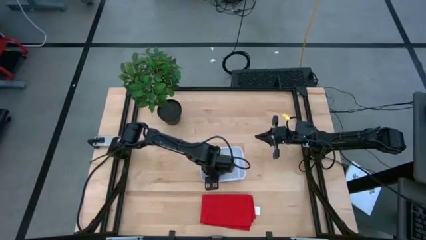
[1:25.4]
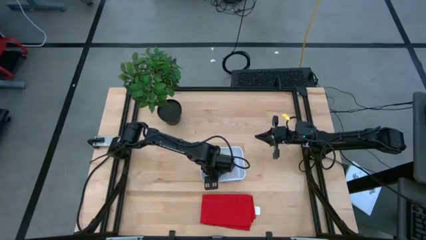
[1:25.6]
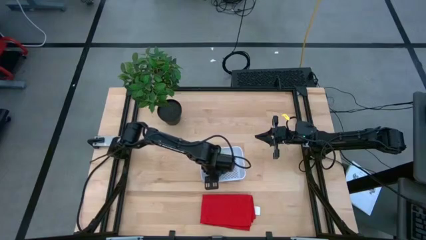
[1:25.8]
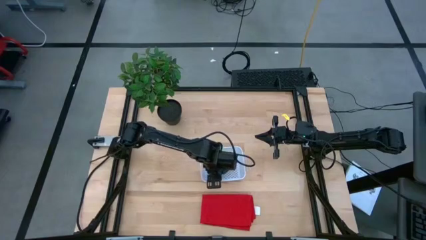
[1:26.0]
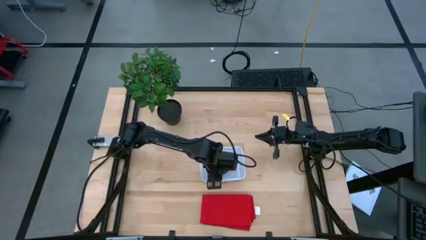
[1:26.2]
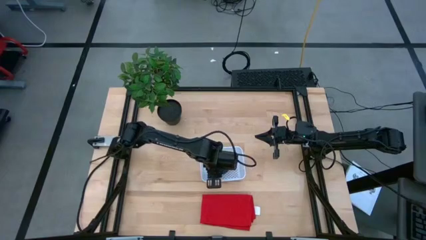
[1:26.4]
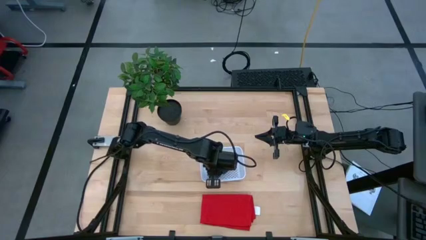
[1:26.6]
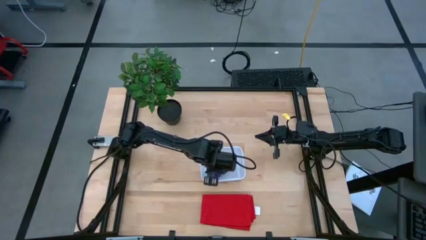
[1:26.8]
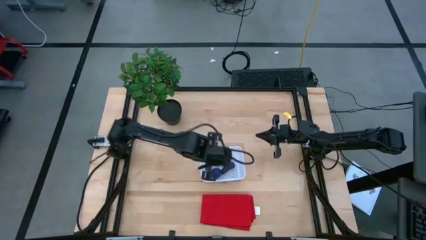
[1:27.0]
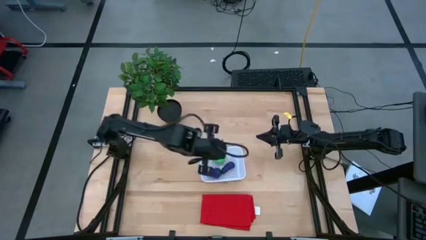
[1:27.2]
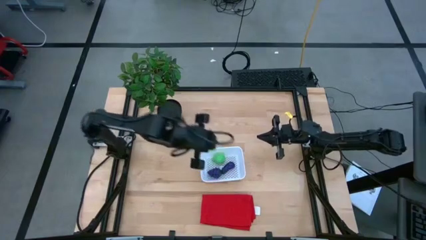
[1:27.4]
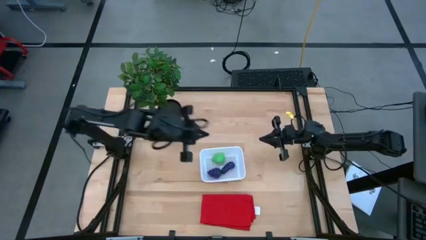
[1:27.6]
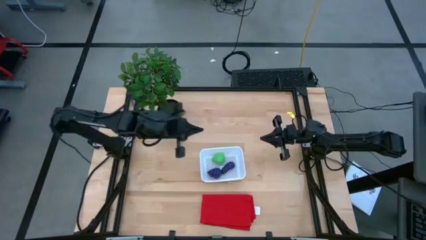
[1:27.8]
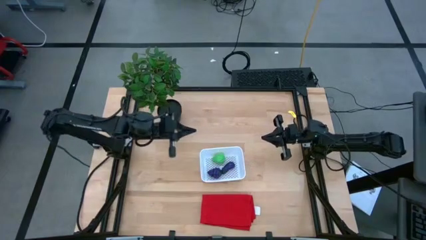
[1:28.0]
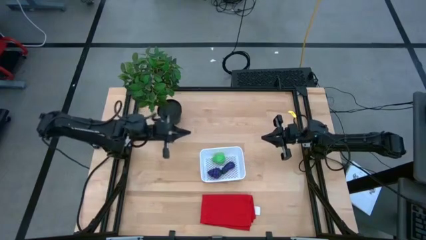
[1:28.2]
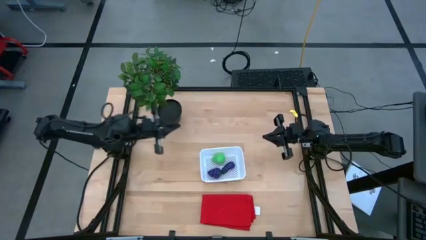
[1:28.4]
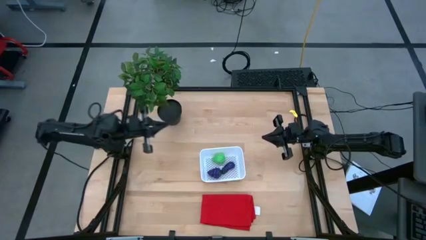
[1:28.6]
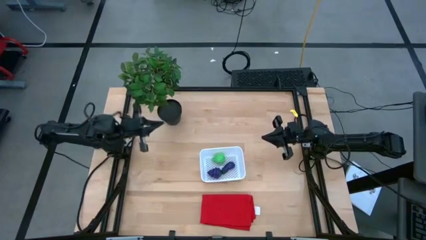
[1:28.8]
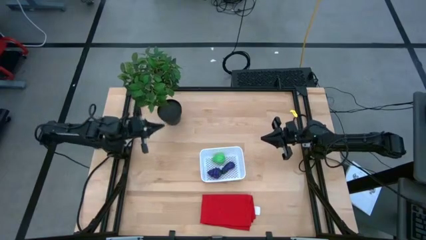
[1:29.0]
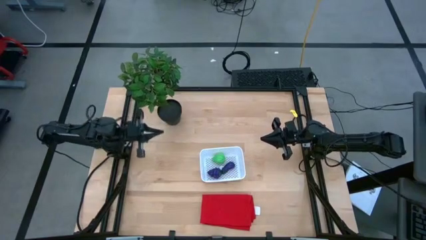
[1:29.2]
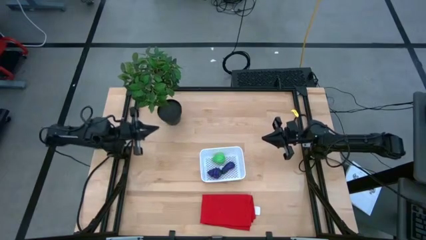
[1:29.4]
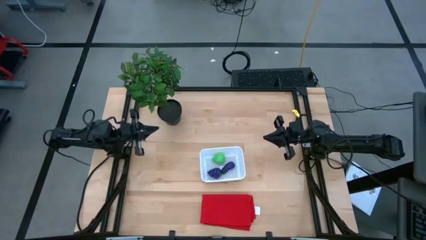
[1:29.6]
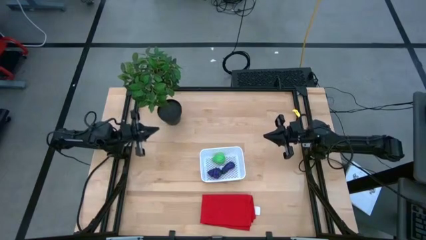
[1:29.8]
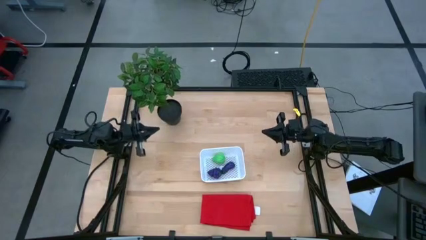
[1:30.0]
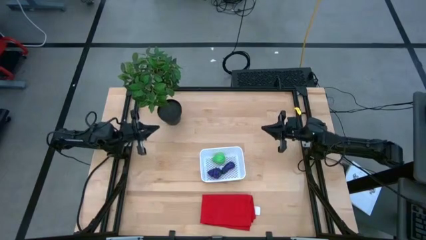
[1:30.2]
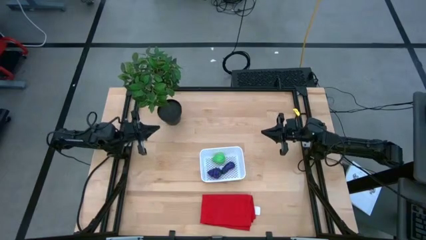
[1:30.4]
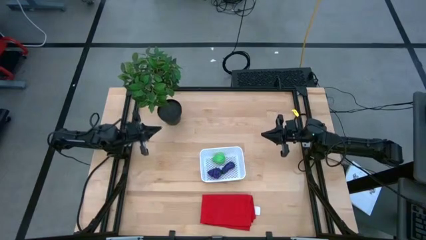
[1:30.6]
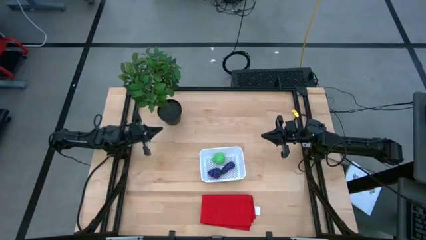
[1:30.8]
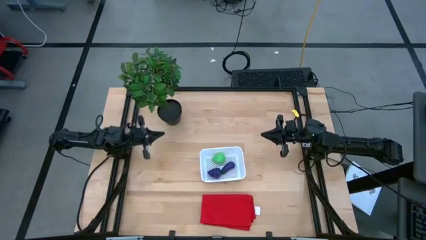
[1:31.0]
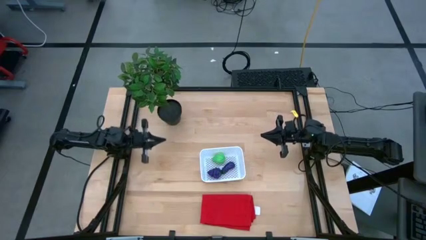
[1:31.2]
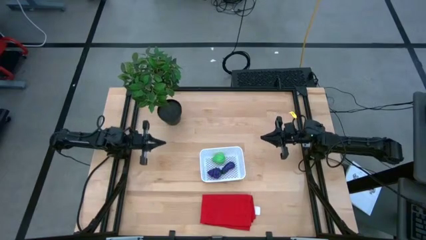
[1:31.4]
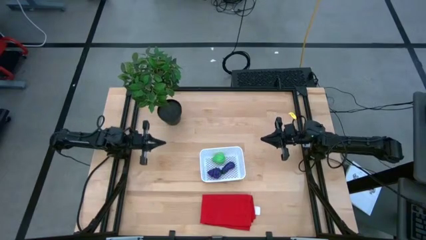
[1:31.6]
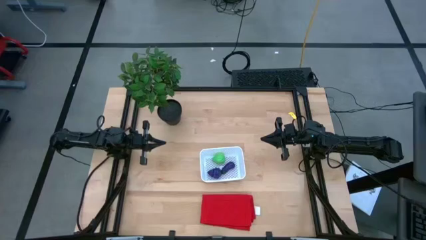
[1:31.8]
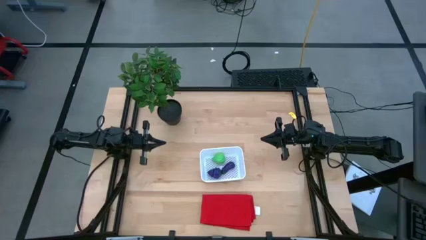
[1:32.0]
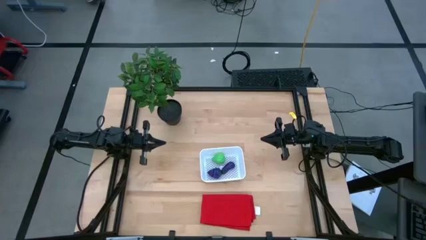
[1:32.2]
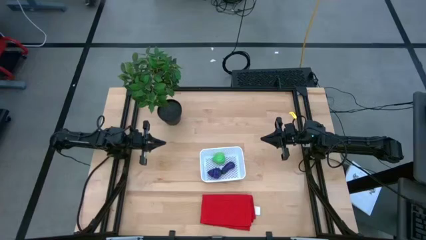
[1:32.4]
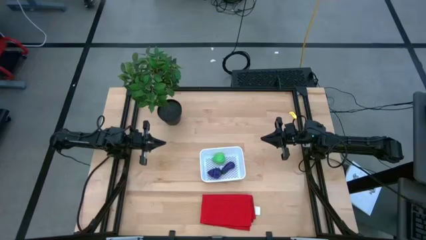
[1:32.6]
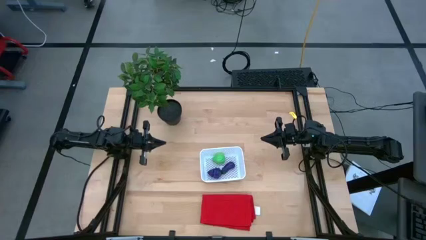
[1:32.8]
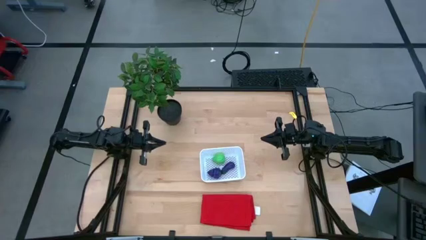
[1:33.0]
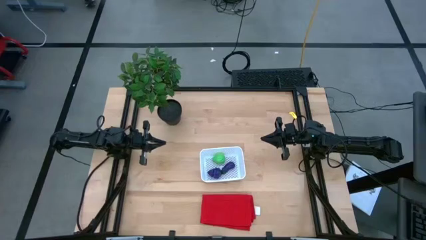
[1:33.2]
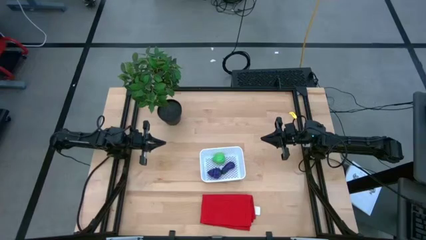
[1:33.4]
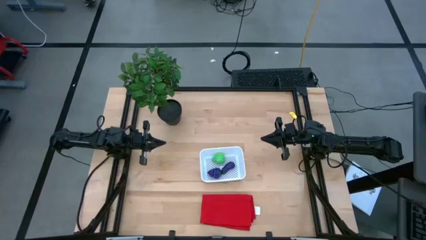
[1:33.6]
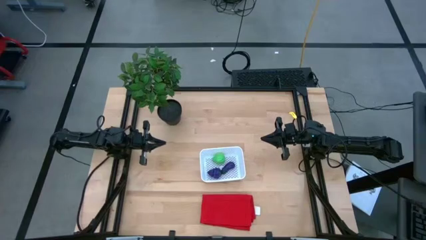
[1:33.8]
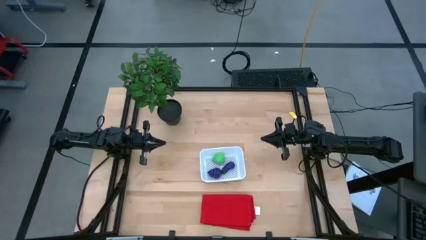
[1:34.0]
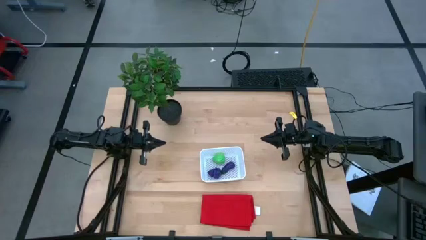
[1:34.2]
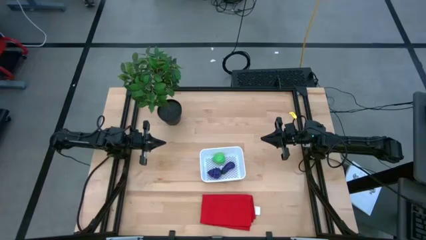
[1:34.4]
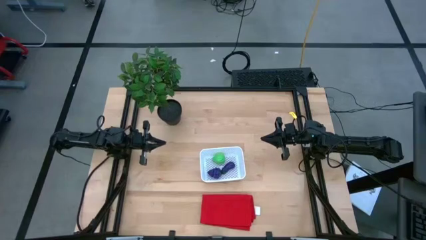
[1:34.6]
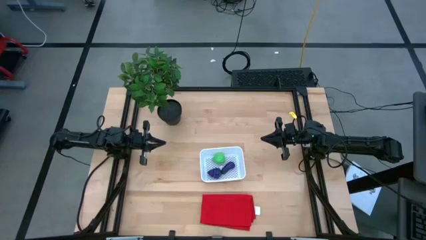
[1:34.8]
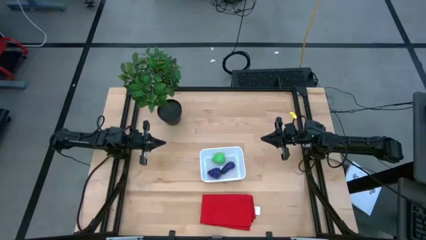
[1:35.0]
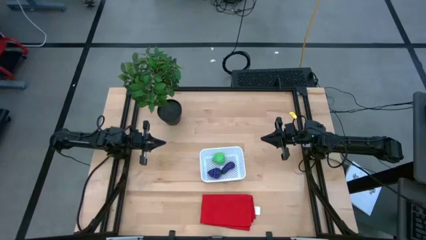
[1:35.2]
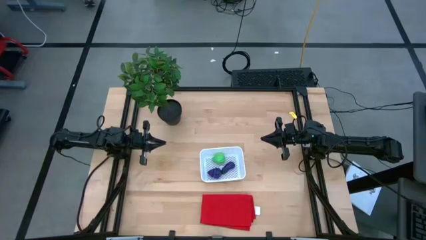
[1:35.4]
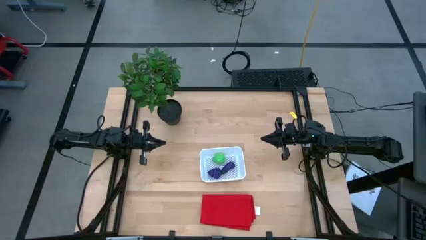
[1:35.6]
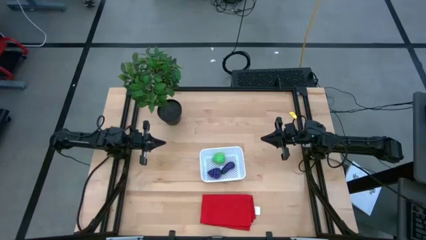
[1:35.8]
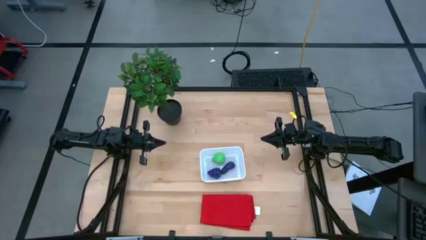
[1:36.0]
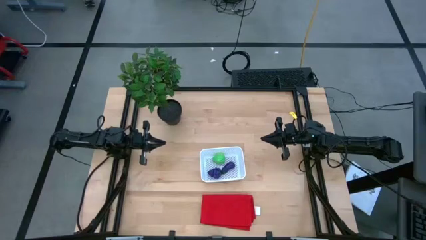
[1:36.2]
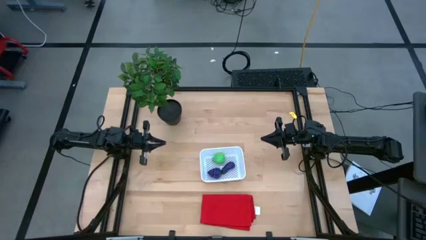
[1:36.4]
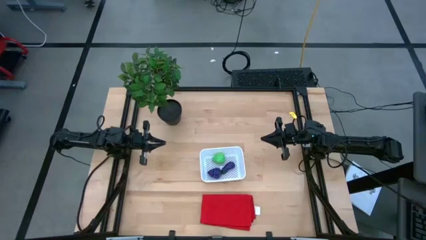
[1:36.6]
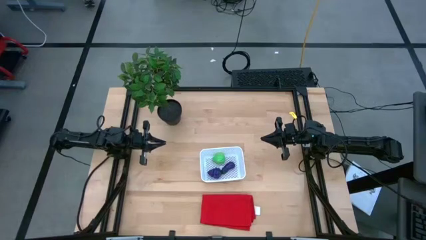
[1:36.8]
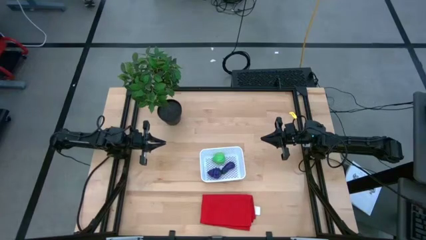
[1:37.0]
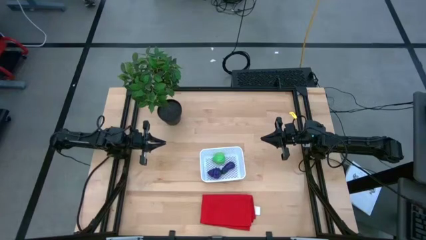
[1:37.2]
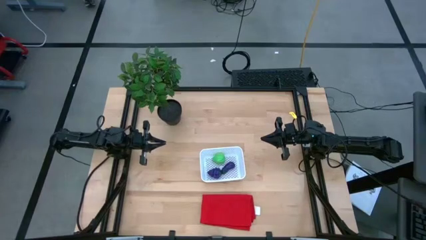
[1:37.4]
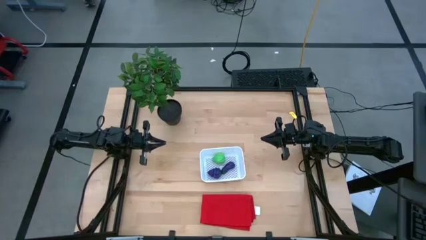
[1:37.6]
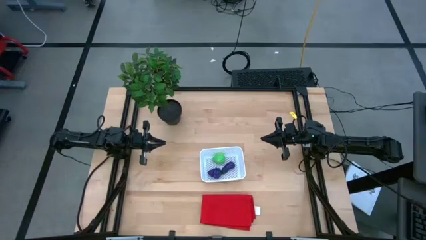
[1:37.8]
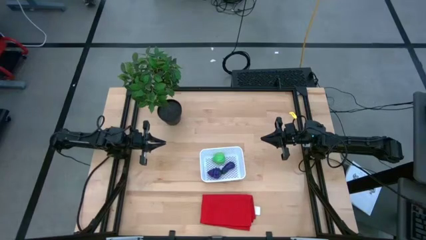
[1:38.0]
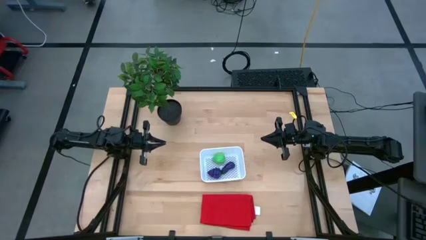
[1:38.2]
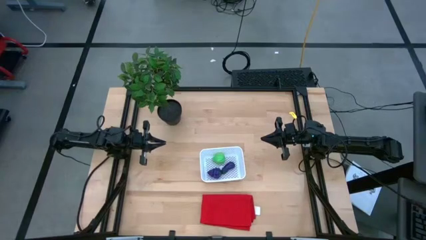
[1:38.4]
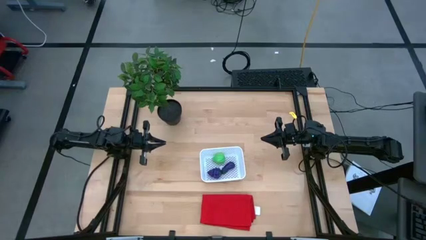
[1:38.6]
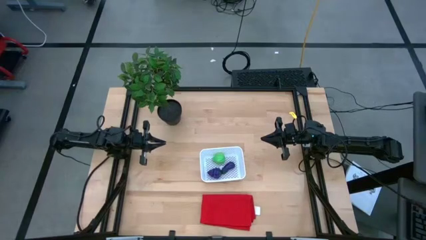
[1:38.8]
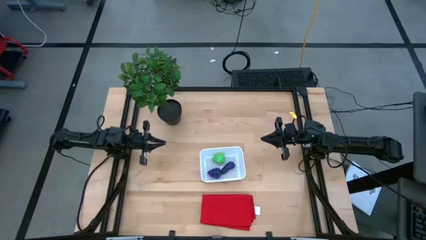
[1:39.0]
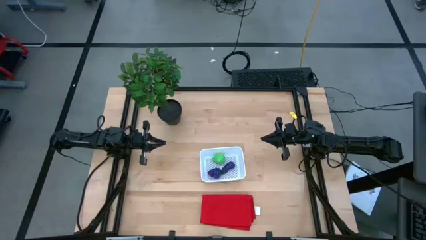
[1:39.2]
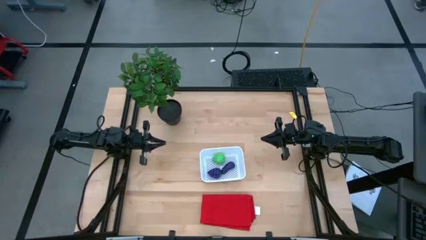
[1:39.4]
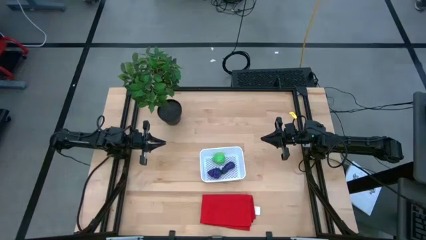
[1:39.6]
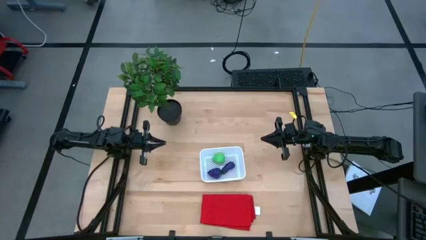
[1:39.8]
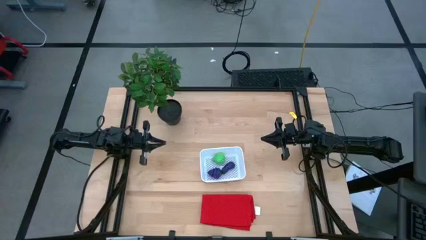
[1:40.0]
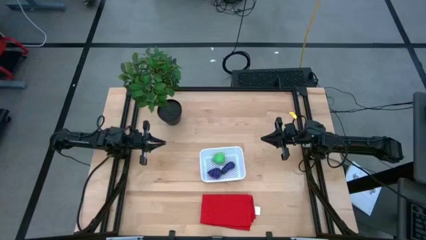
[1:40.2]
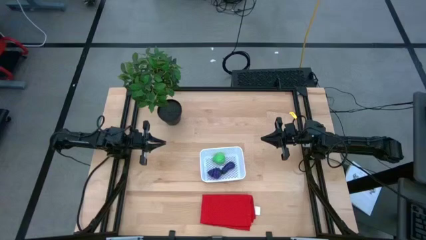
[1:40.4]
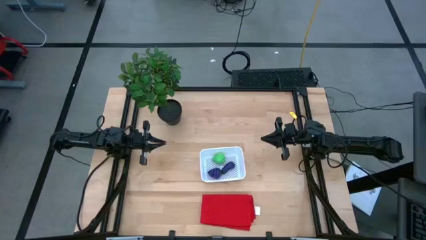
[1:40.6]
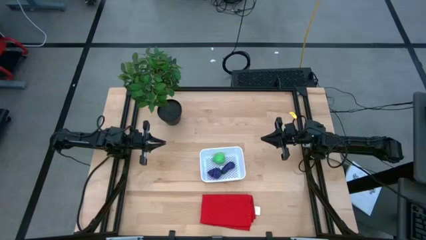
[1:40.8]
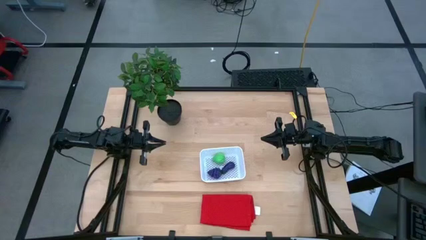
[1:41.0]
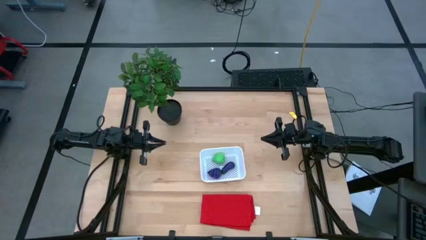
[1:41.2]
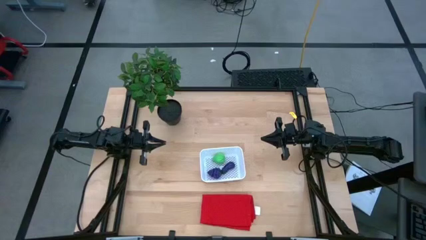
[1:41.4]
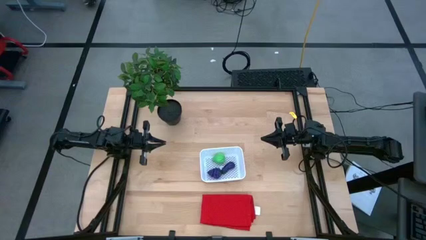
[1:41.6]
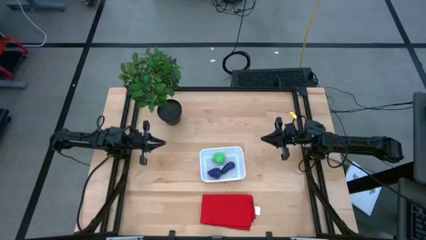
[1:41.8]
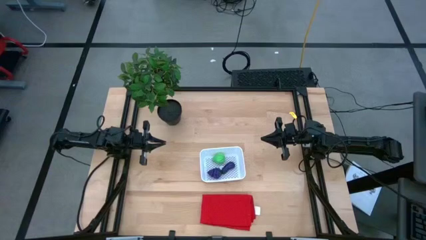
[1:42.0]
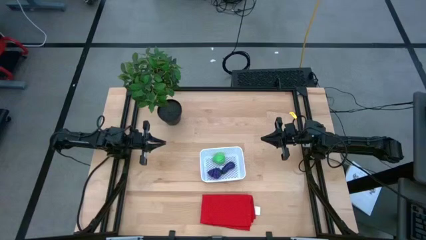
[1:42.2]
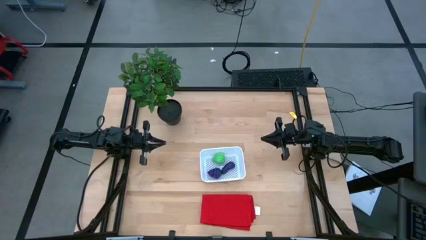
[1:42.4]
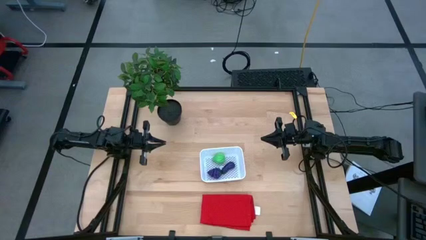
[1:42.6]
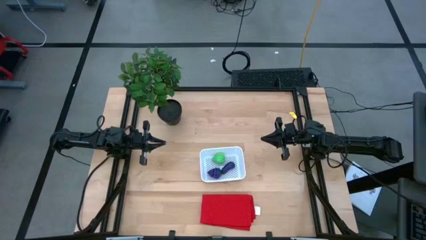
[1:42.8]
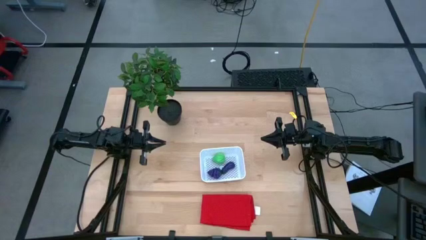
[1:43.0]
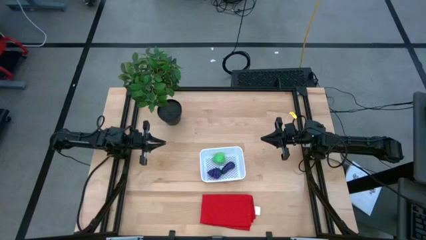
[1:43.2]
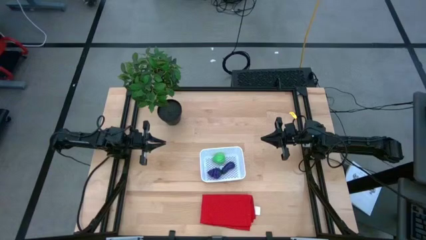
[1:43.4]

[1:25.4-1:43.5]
Task: Pick and placing Produce into tupperware
Return to Home Position
